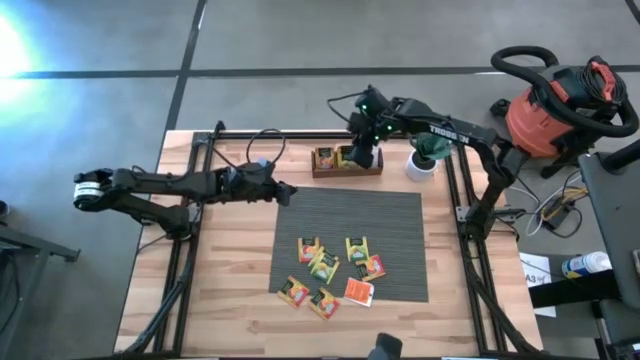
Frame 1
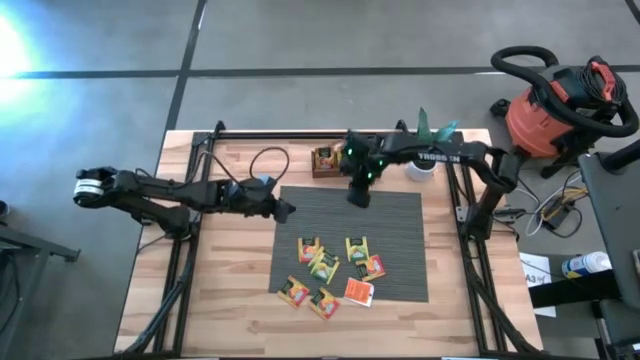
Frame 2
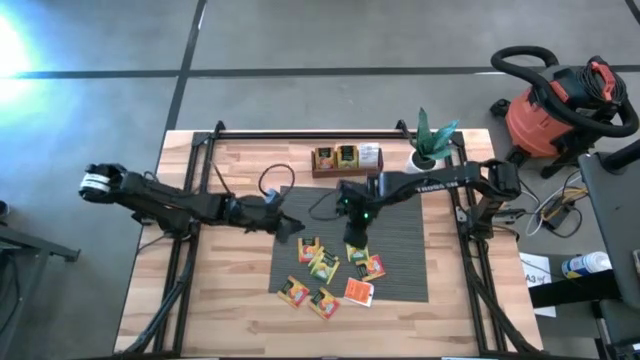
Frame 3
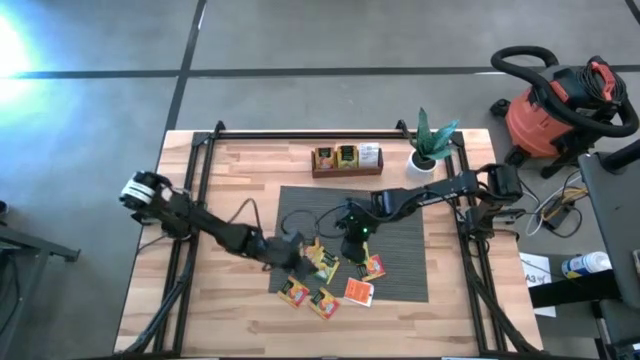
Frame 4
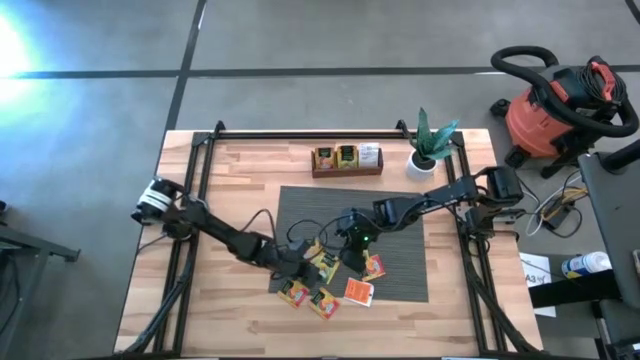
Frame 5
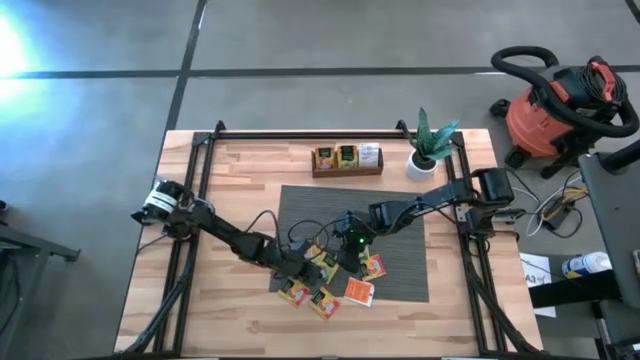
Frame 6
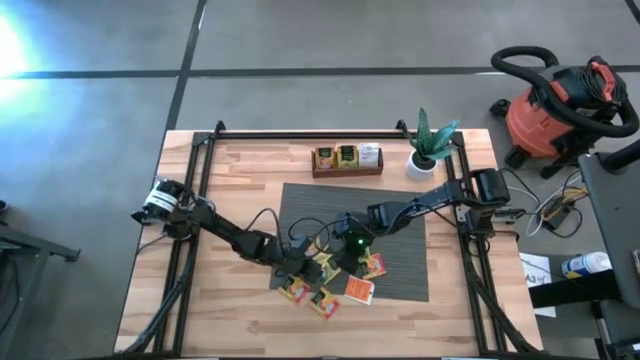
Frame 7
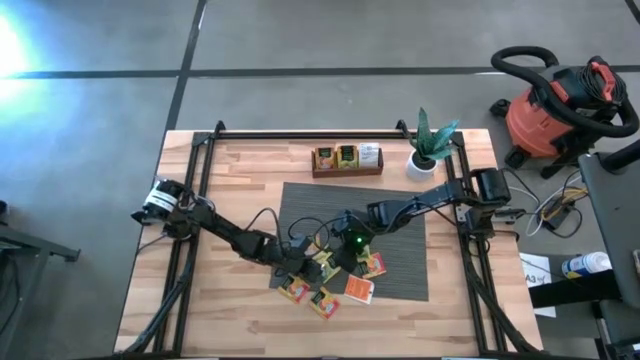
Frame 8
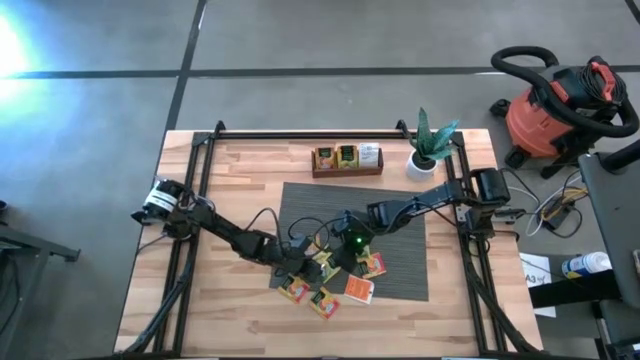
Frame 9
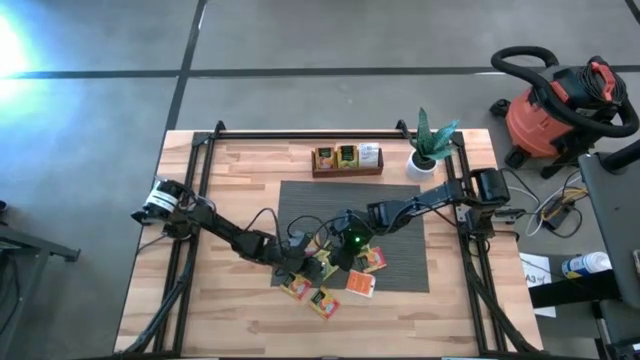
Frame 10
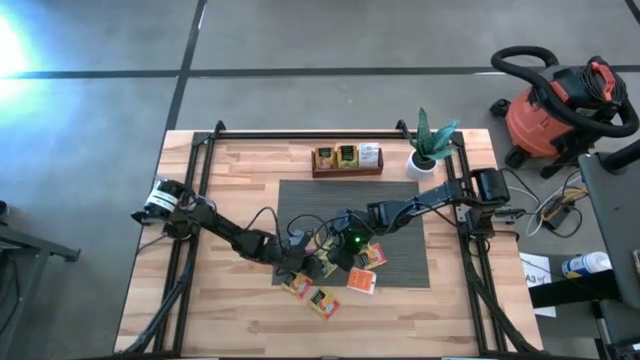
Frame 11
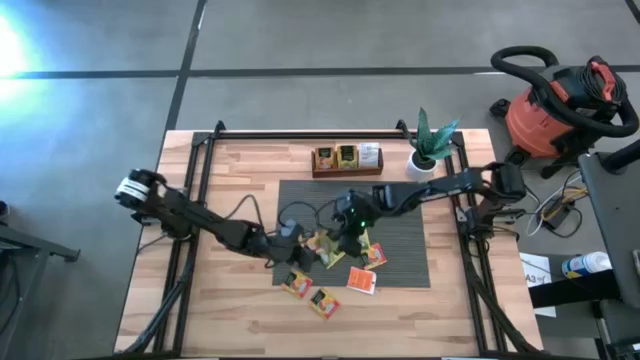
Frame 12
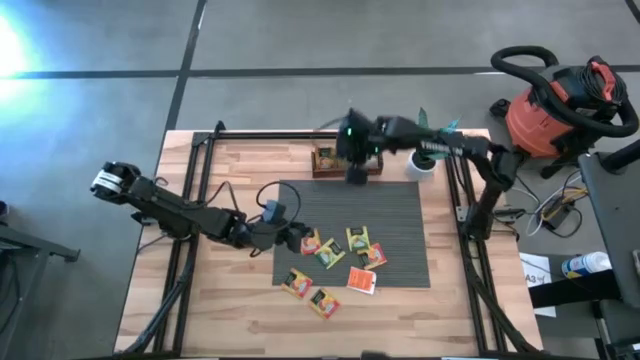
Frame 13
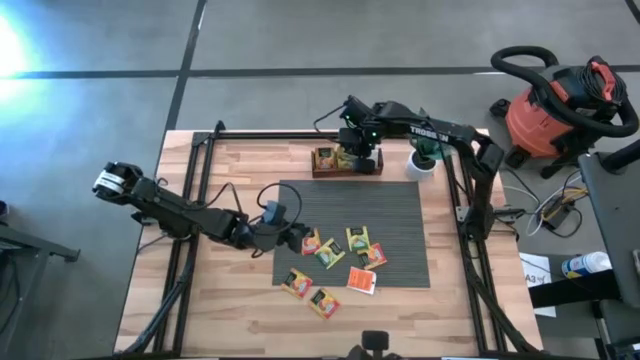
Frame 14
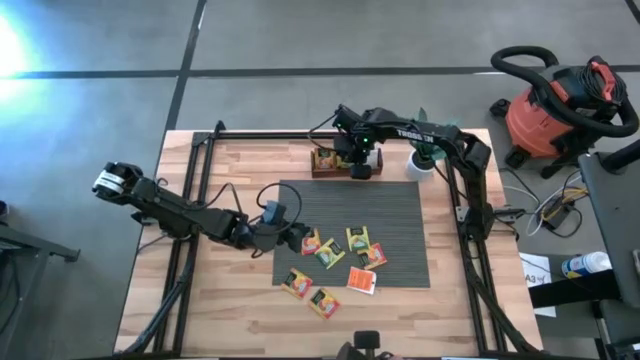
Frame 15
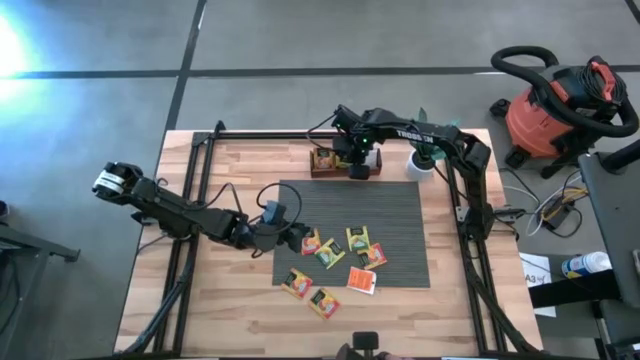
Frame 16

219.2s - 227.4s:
Task: Pick & Place Tea
Put the yellow tea bag into the middle section of the wooden organizer

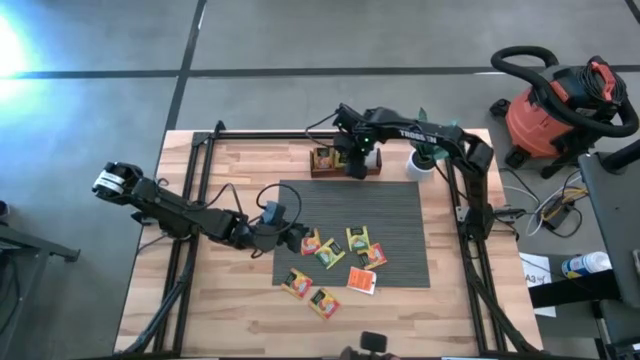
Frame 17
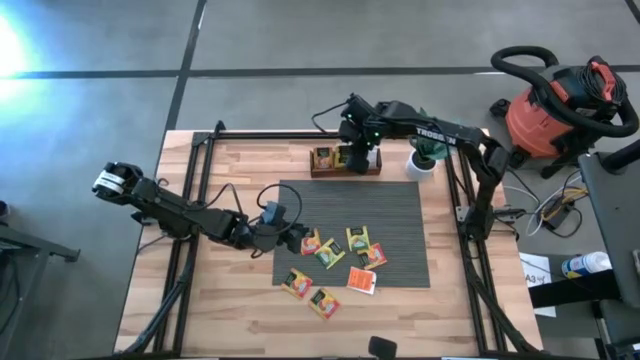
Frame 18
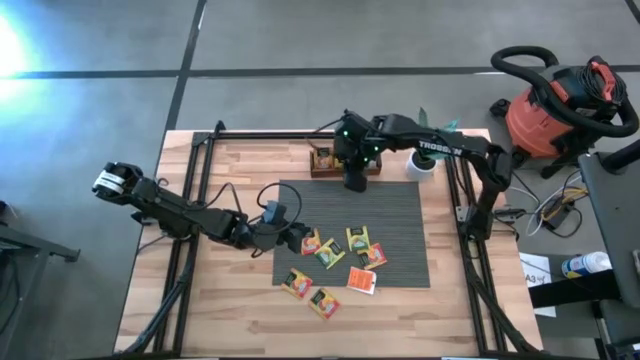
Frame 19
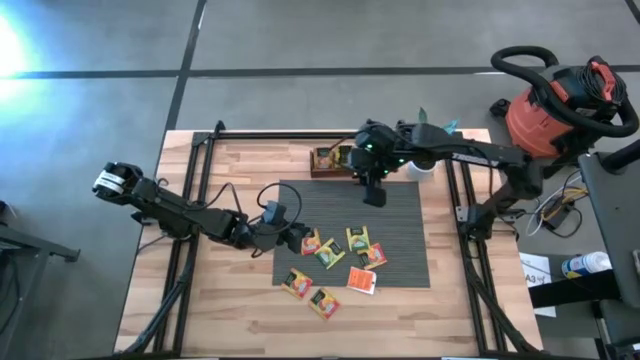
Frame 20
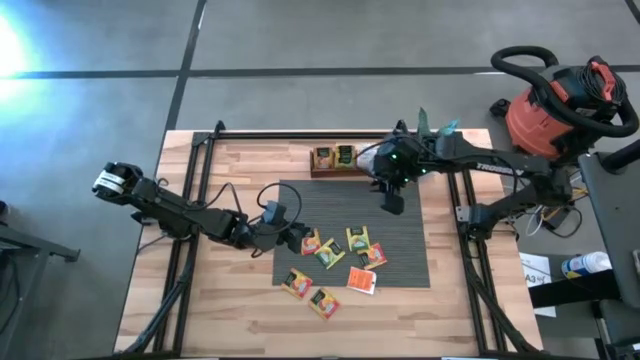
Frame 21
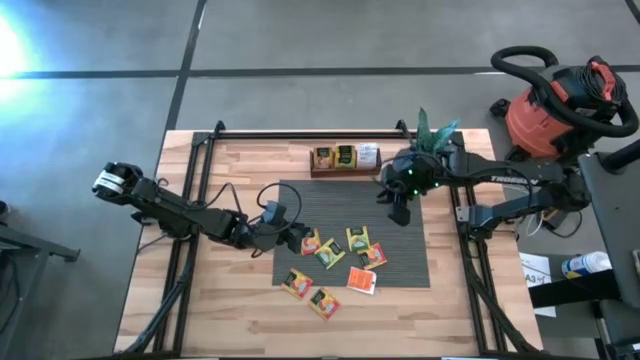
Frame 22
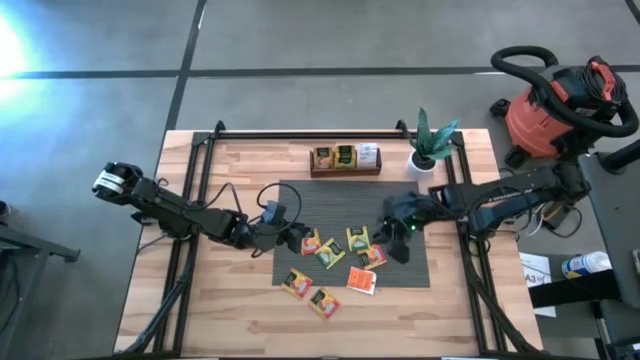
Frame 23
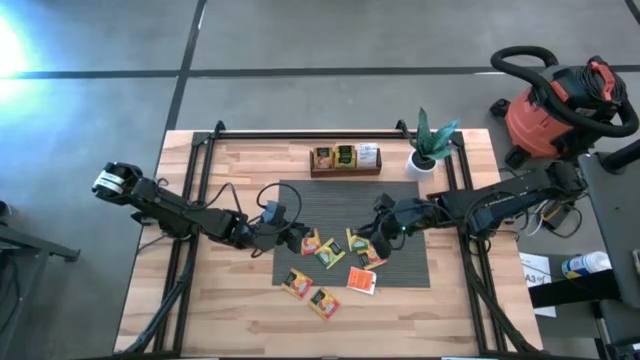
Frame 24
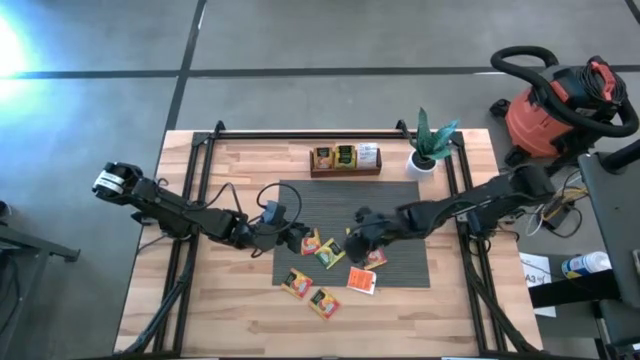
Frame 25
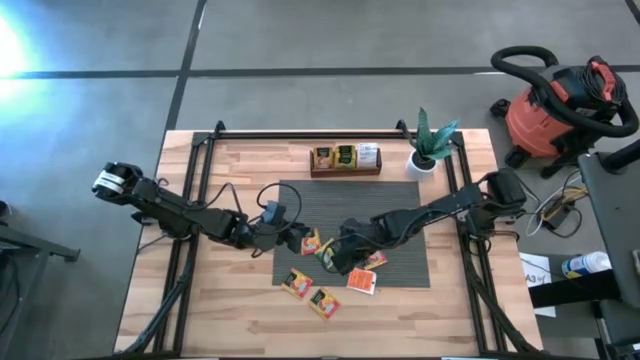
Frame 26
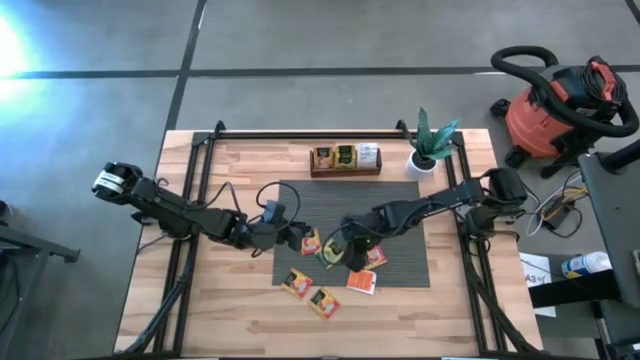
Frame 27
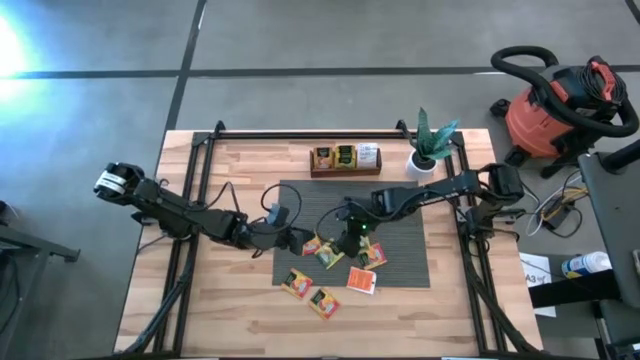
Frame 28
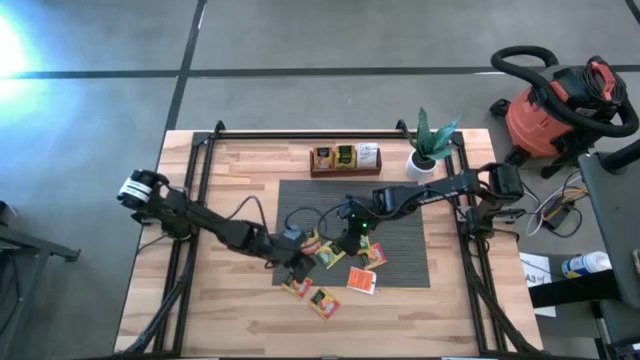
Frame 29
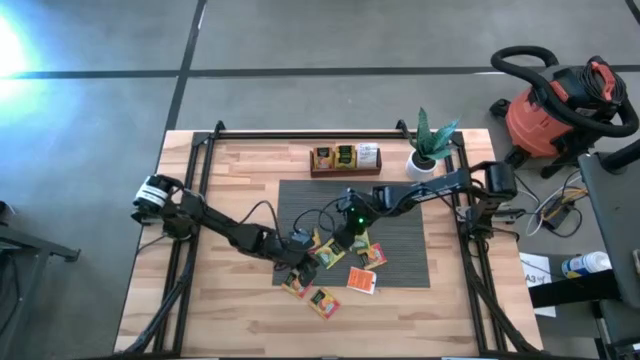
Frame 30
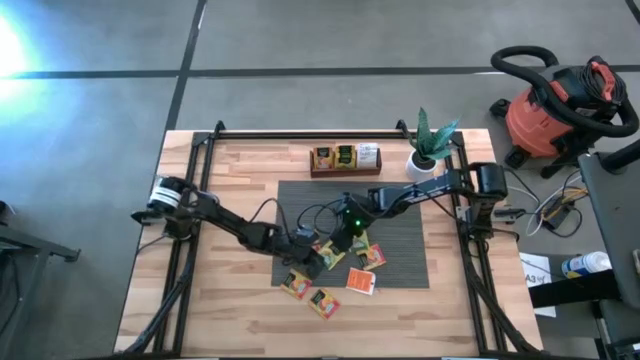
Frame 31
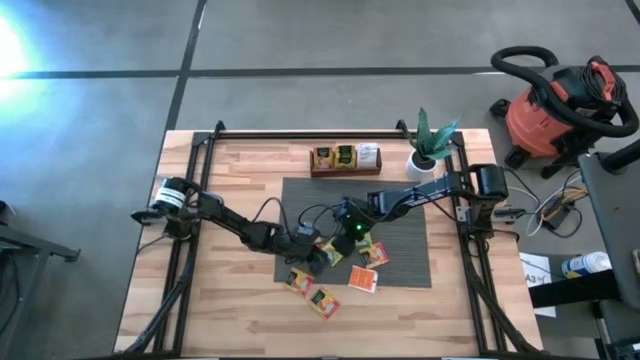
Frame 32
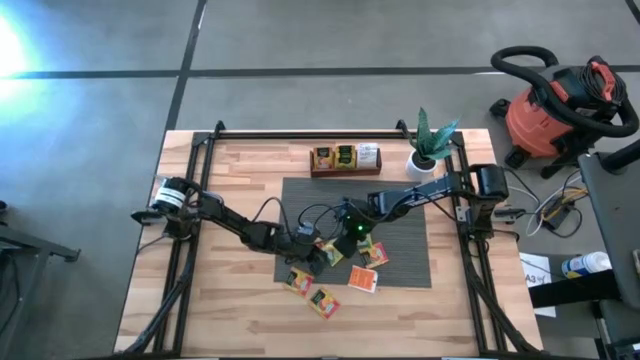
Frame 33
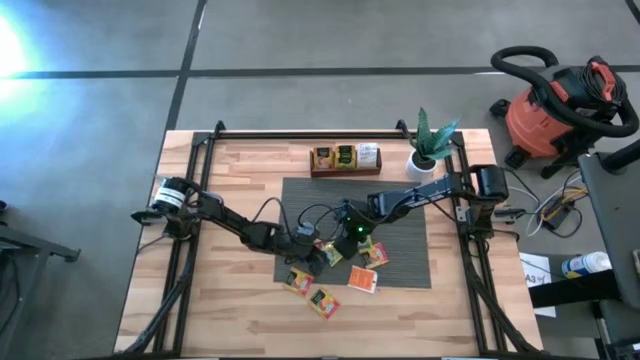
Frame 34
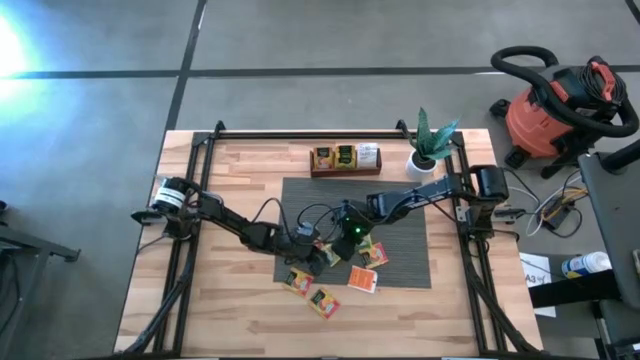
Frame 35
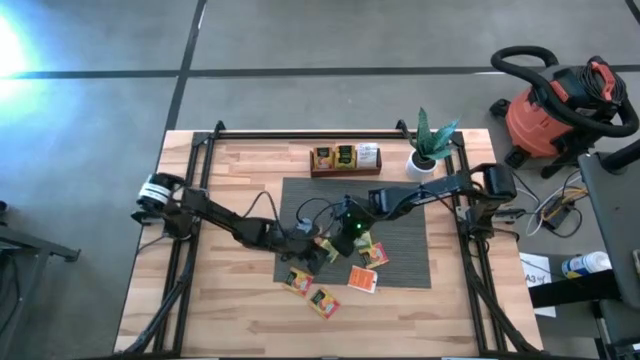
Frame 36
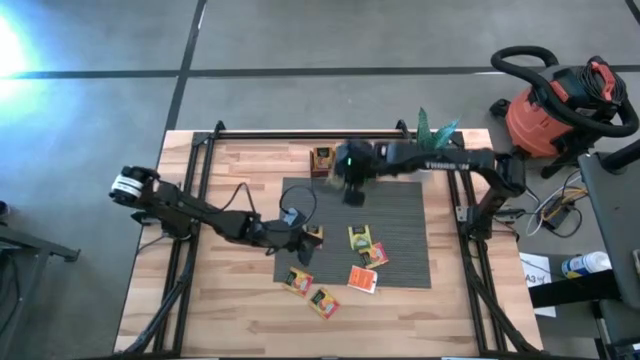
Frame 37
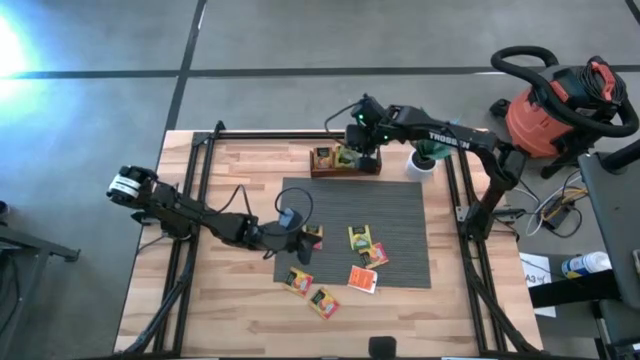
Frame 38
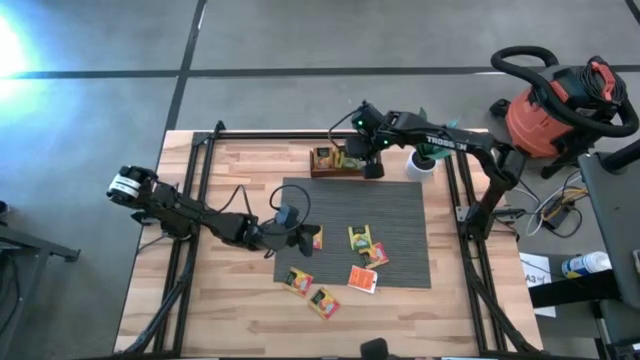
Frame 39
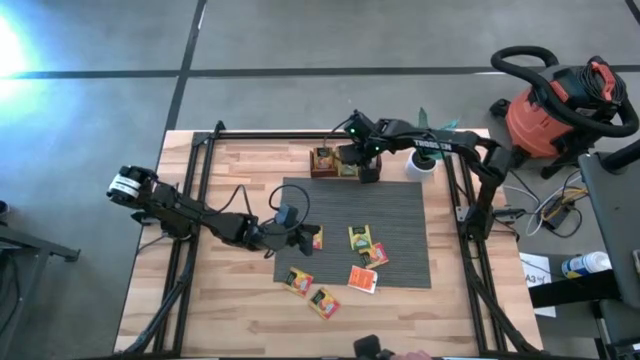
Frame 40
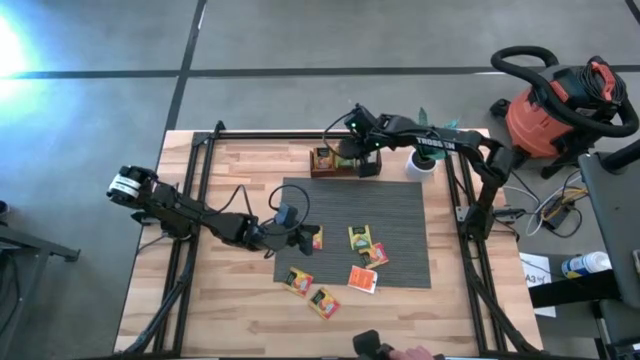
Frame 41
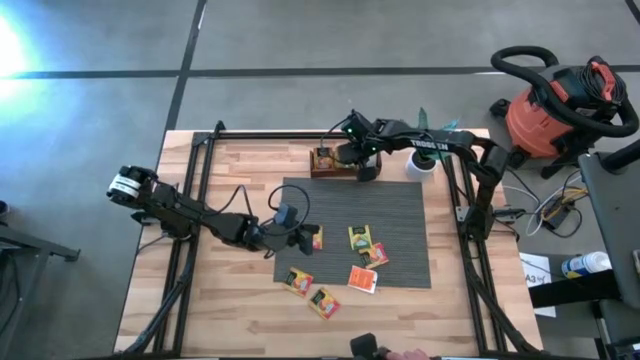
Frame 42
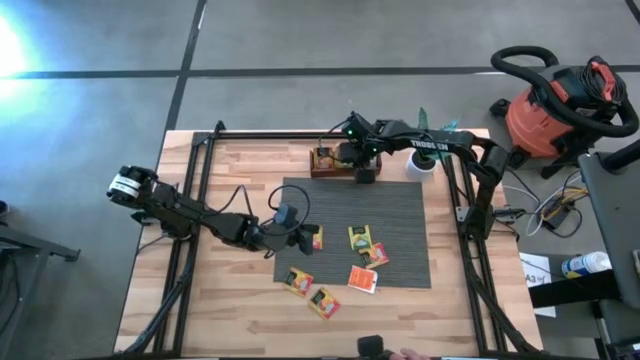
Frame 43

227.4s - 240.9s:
Put the yellow tea bag into the middle section of the wooden organizer
